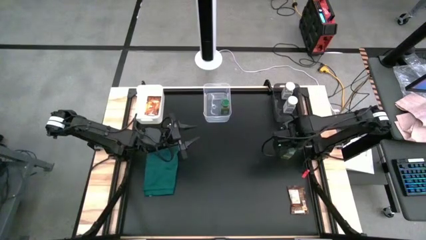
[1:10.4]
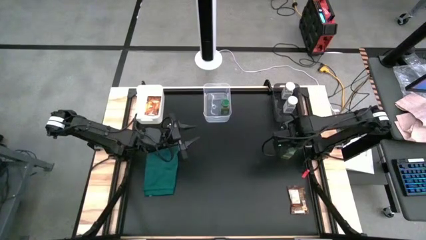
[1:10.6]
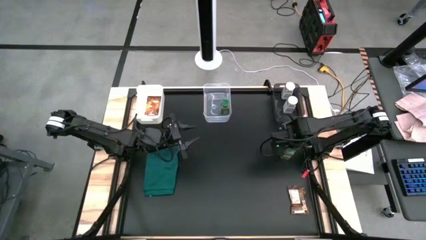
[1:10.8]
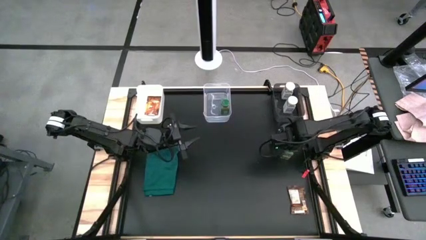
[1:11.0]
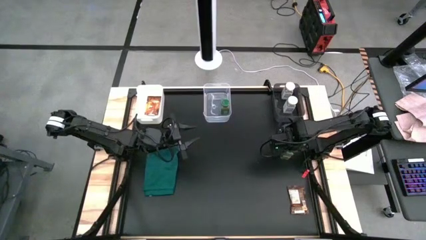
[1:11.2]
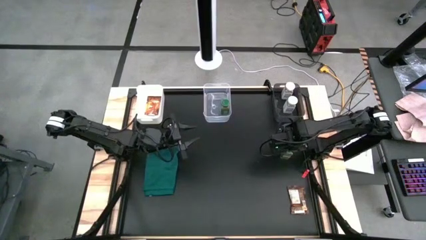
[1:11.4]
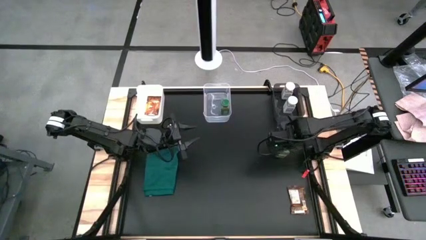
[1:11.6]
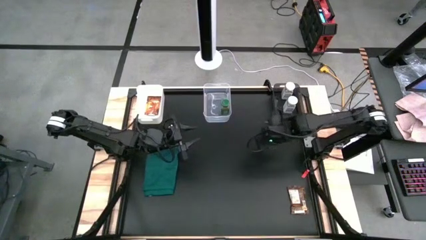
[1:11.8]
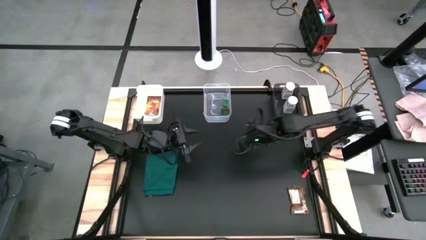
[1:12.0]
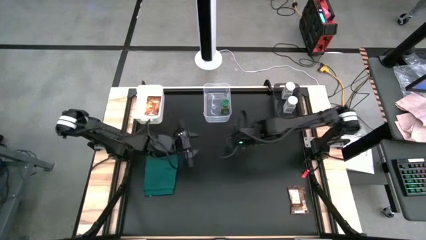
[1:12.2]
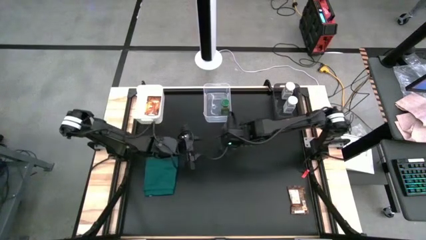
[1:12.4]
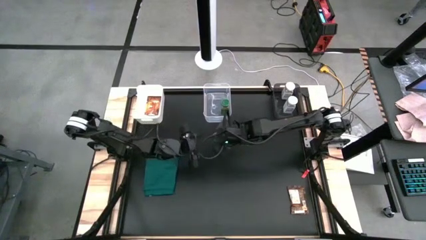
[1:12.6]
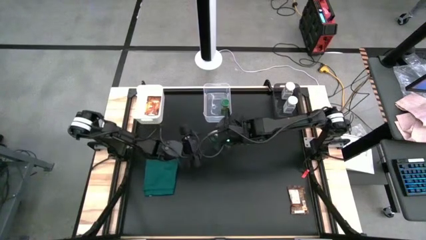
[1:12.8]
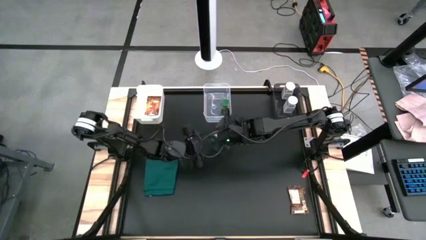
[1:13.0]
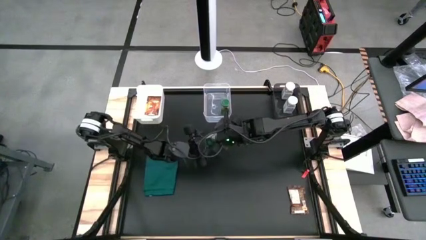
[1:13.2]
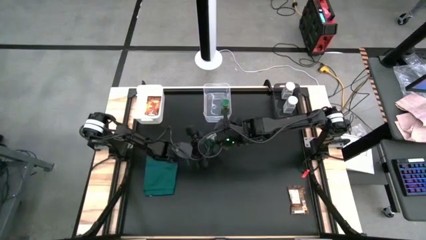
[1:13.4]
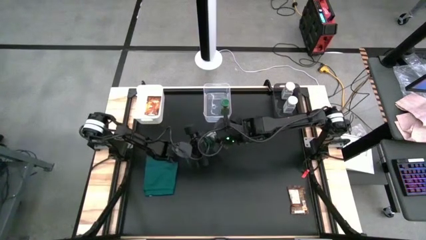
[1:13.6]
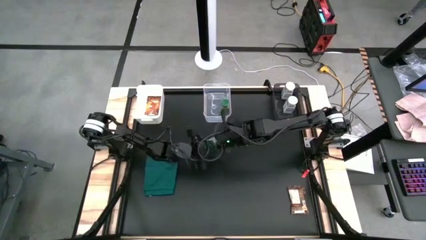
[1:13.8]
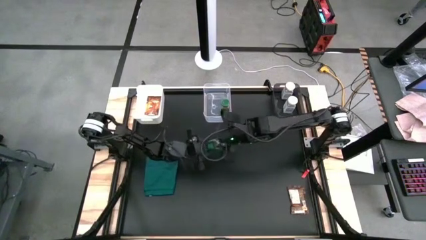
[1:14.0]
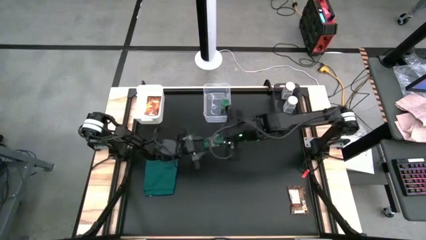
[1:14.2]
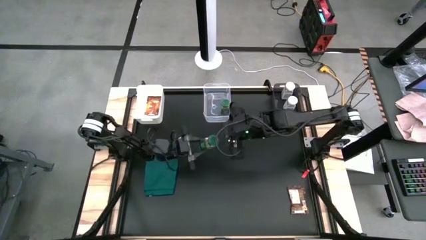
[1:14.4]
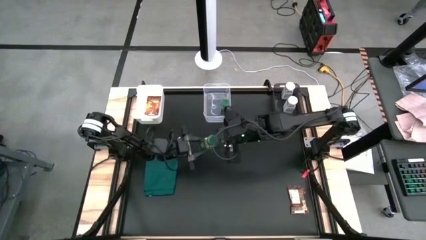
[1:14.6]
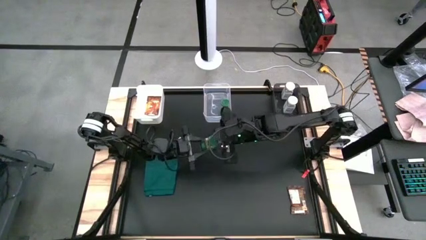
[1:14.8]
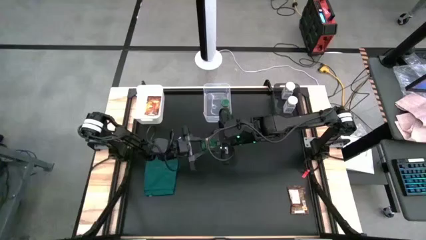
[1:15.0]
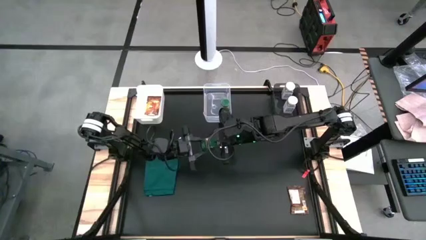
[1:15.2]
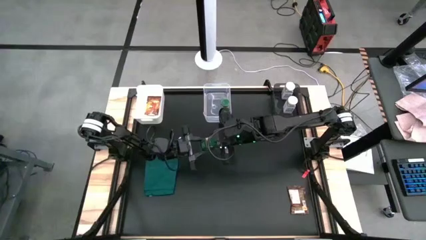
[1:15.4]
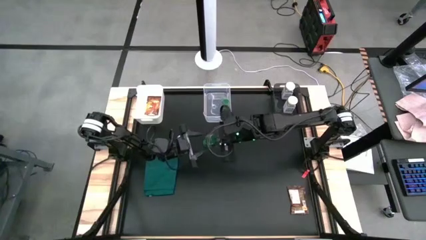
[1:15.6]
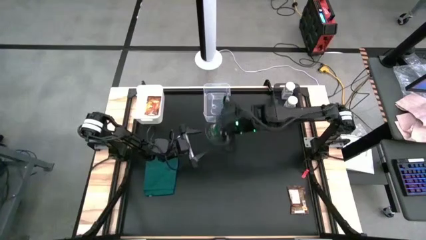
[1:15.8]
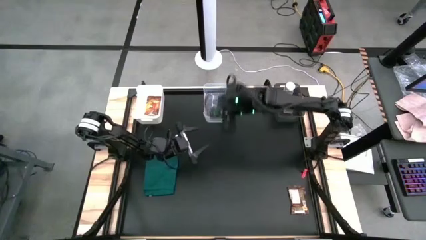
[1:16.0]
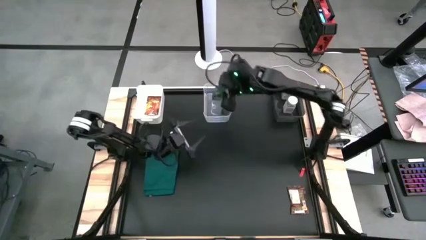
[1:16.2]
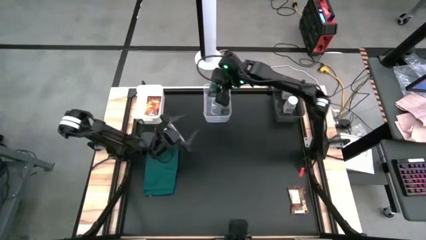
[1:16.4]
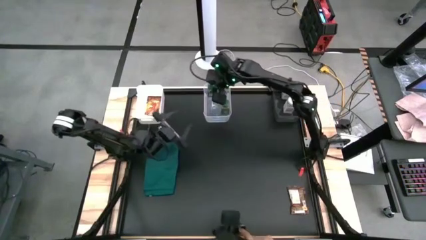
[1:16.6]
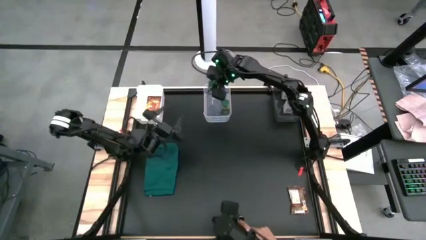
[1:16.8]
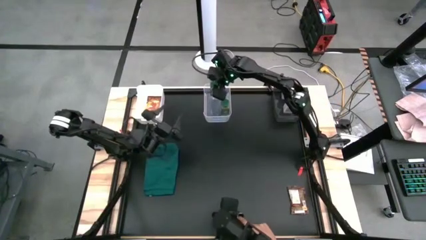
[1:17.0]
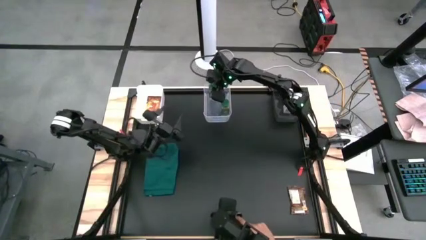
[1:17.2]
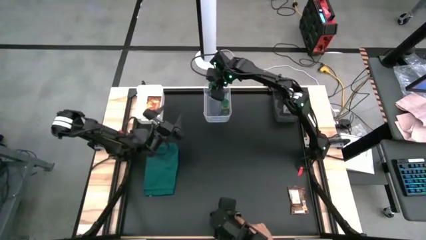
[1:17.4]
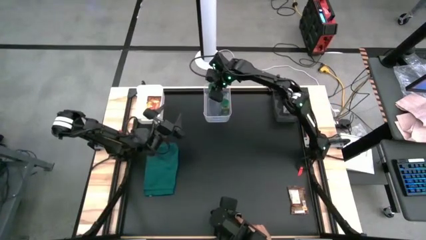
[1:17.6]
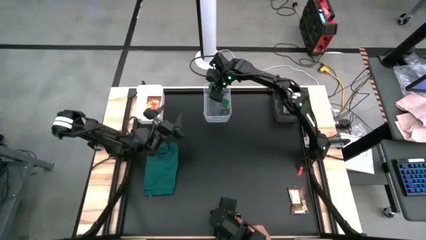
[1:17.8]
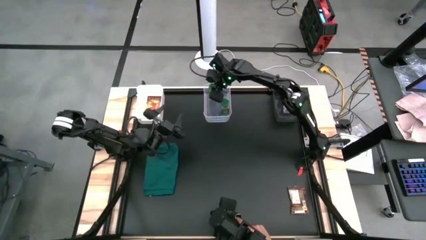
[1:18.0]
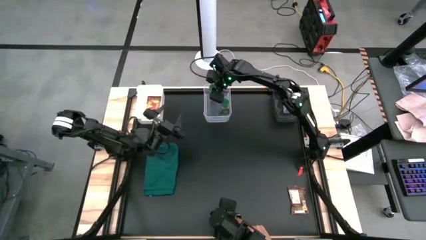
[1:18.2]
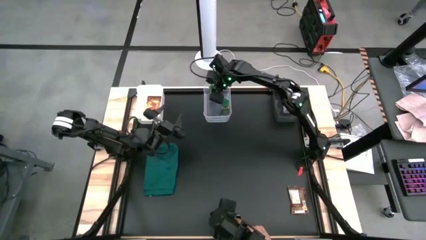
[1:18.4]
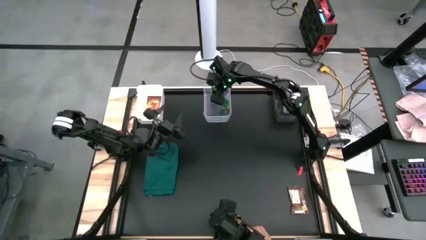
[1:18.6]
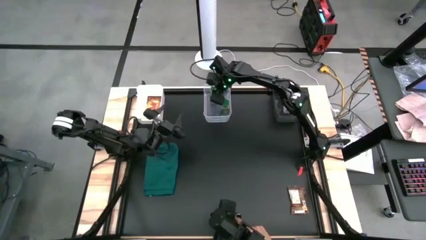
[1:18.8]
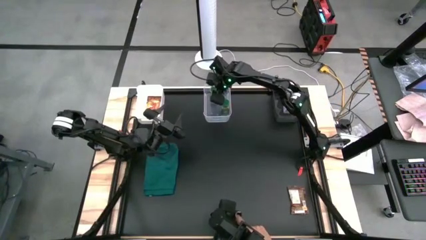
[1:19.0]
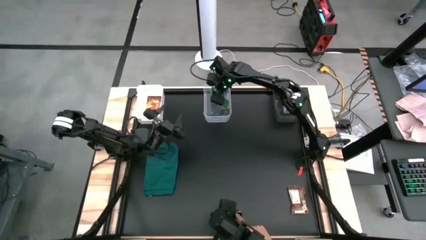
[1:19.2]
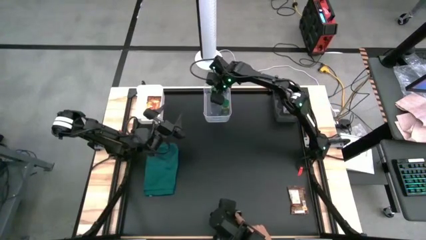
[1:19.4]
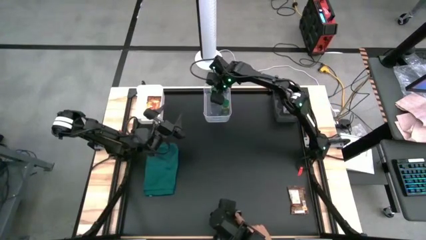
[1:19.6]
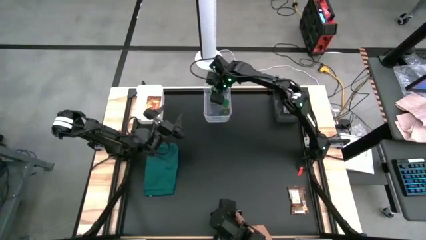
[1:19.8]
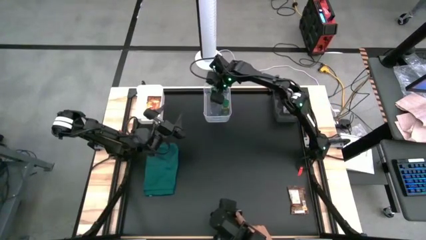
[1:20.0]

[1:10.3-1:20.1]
Task: Sort spices by type
Put the green seasoning bottle into the transparent bin

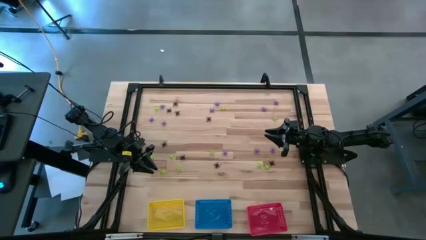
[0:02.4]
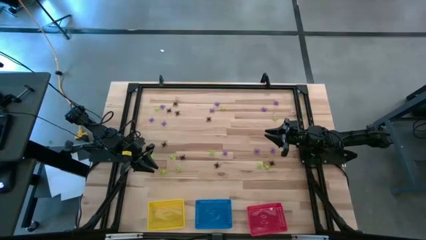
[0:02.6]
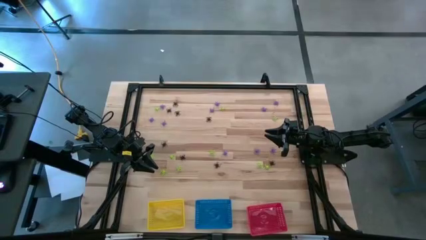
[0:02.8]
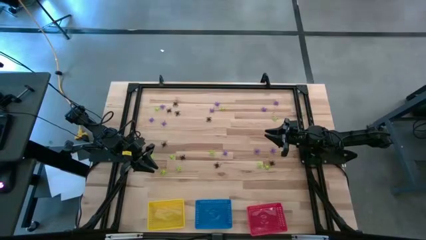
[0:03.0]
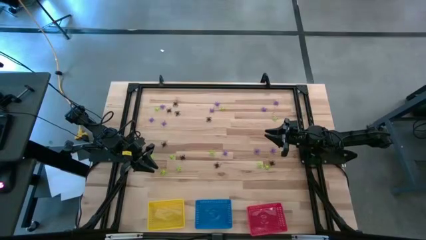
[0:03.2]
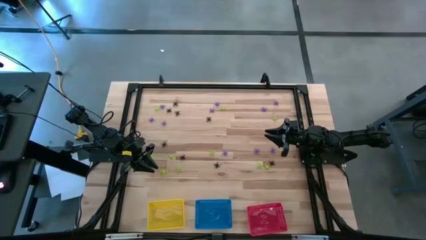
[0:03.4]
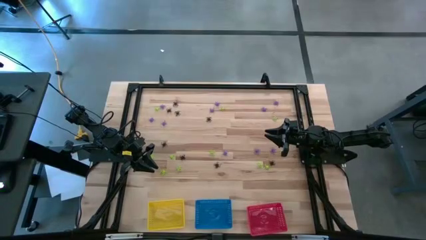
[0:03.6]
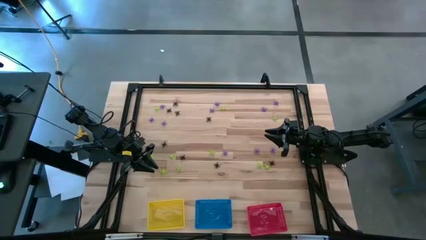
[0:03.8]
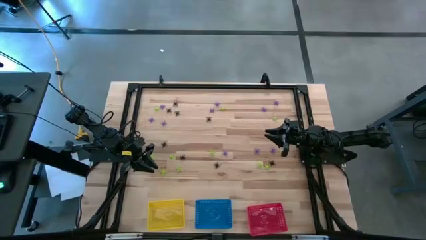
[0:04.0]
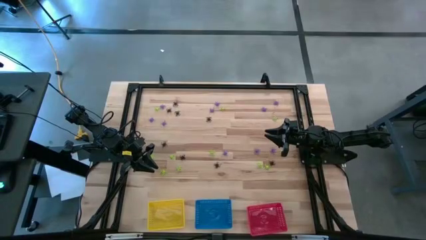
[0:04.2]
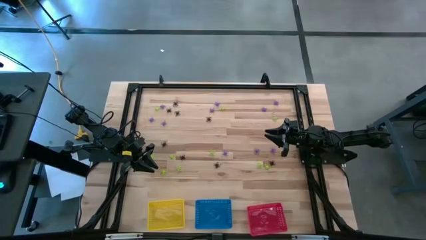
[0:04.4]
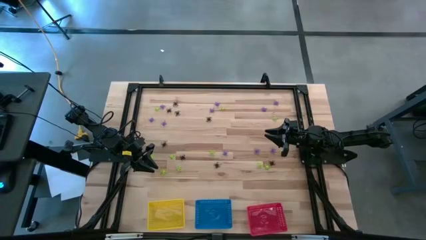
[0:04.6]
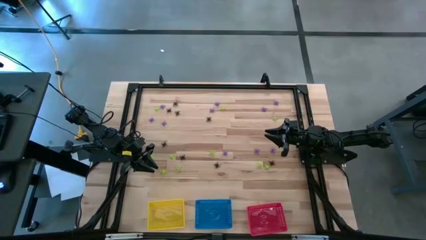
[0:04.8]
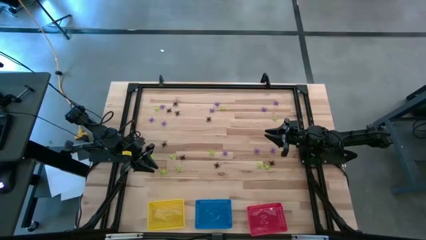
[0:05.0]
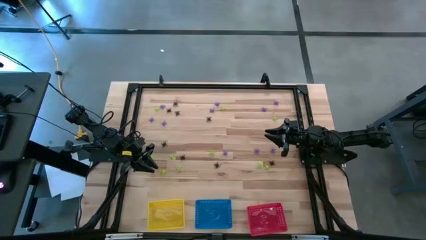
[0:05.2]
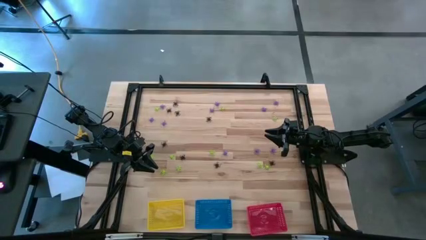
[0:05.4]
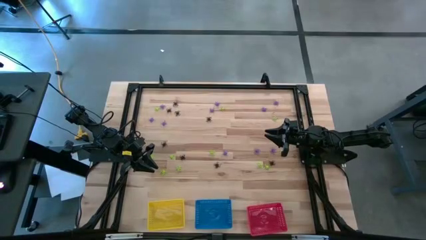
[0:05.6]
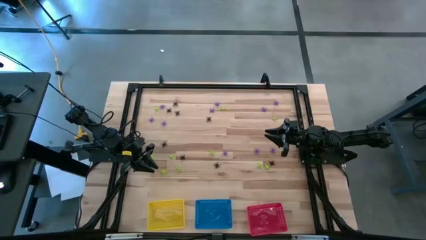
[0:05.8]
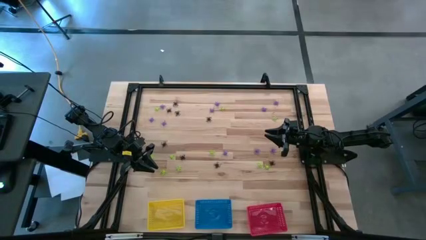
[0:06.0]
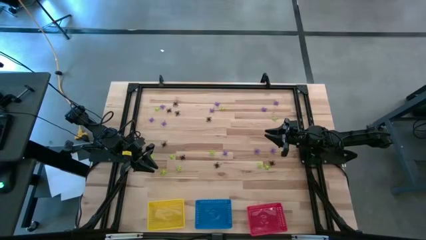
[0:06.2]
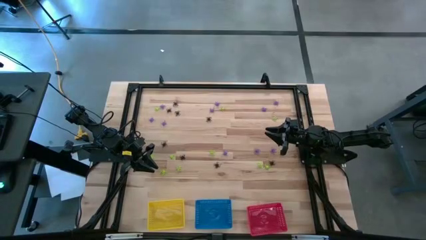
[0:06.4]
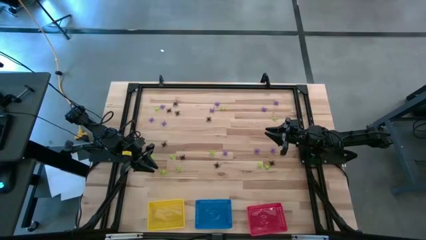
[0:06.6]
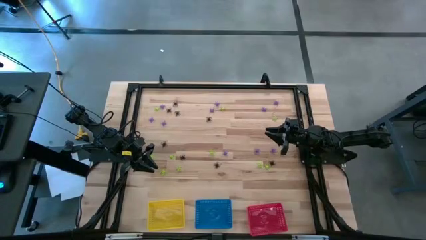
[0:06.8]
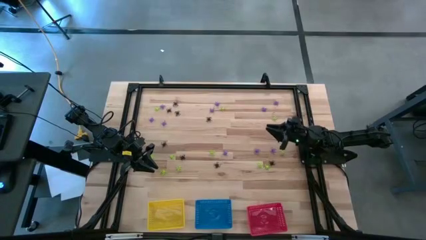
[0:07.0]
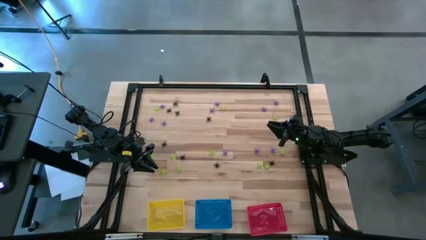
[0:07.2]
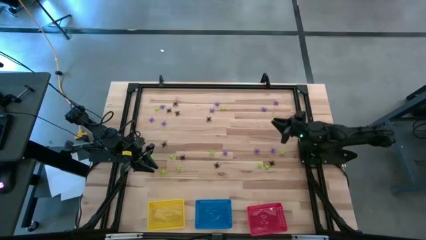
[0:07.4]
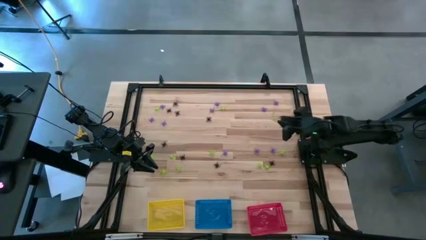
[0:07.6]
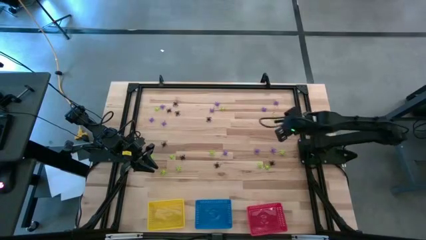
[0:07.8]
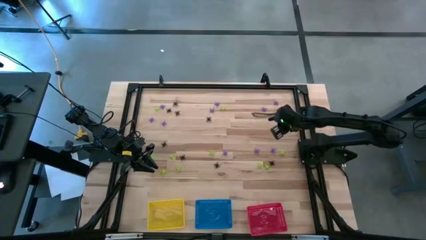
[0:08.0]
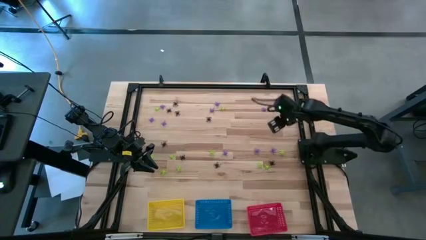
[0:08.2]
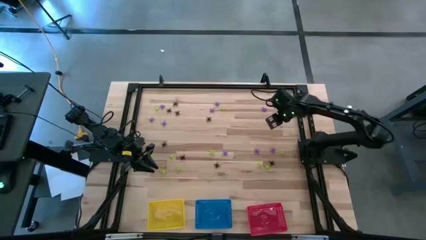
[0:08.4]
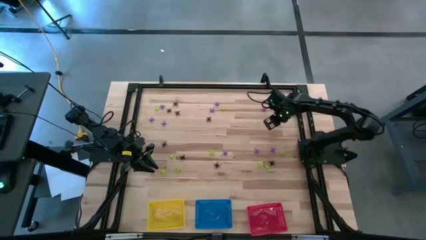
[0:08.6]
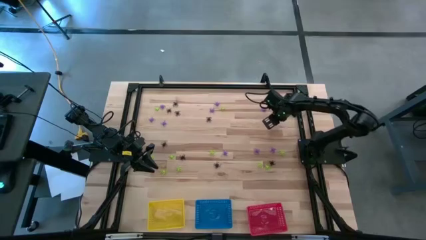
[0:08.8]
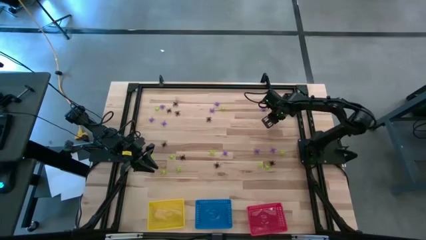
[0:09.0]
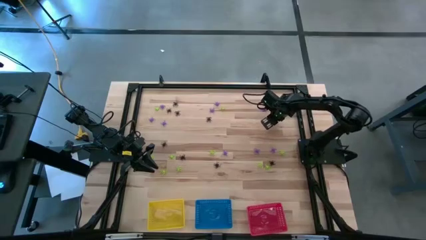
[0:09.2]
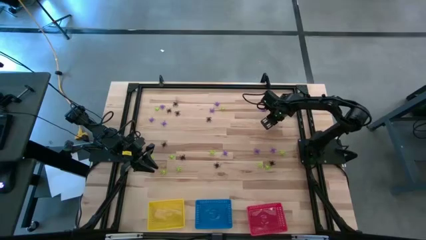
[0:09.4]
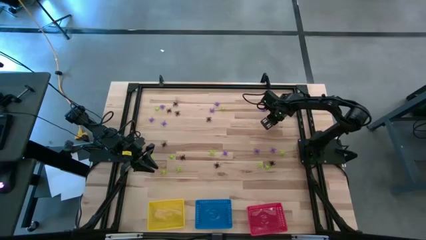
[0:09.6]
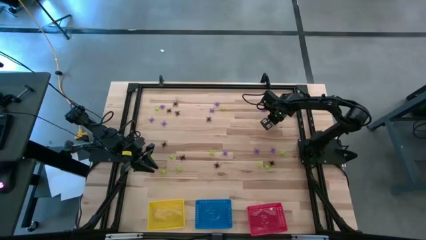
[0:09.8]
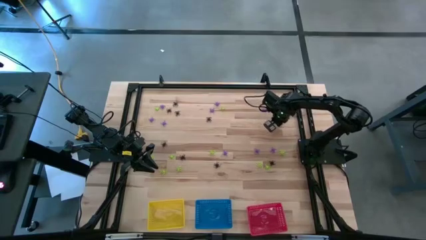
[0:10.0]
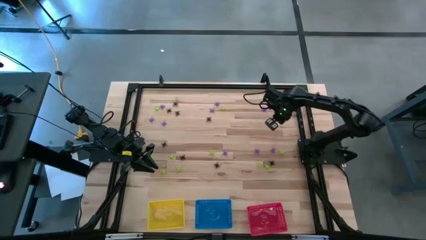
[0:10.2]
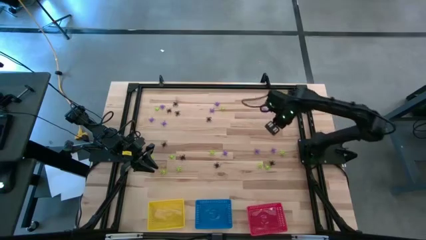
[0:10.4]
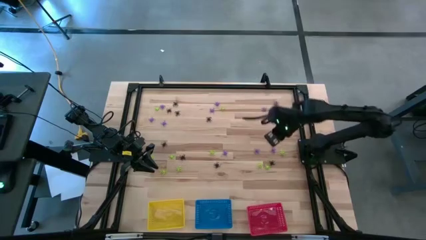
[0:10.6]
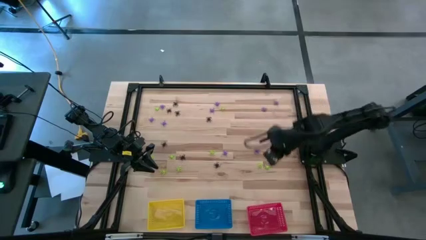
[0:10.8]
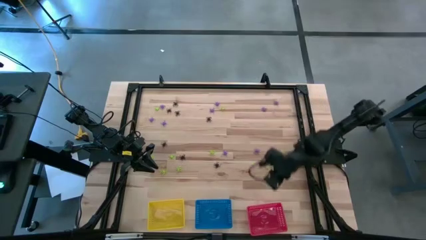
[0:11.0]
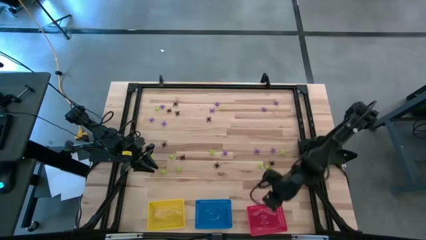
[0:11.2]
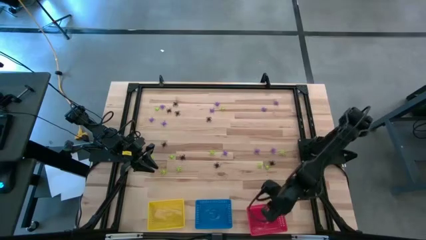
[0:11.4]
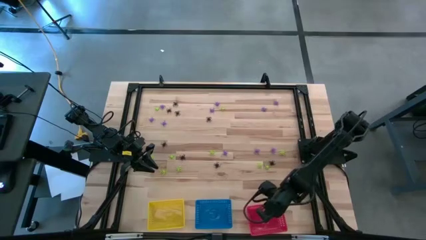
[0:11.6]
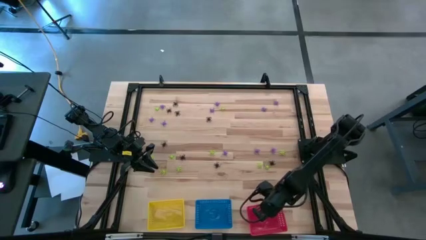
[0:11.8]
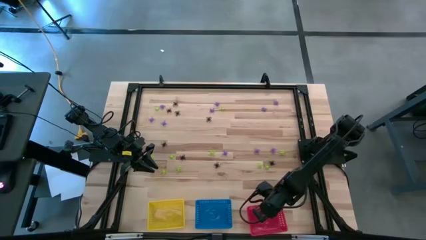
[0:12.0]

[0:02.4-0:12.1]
Task: Sort Halloween decoration
Put the green spider toy into the red bin
